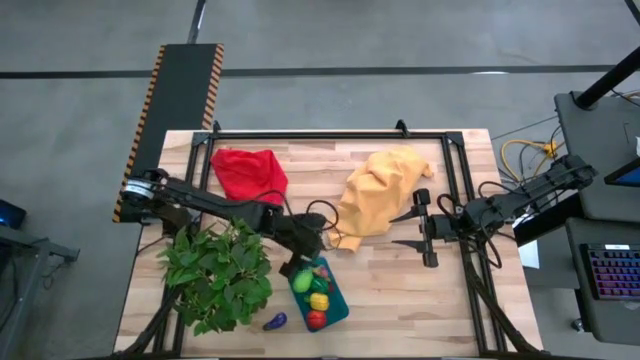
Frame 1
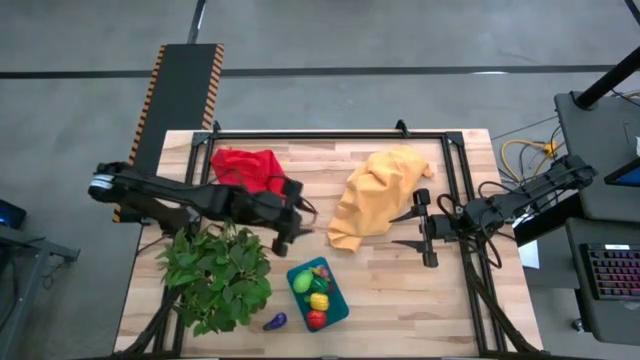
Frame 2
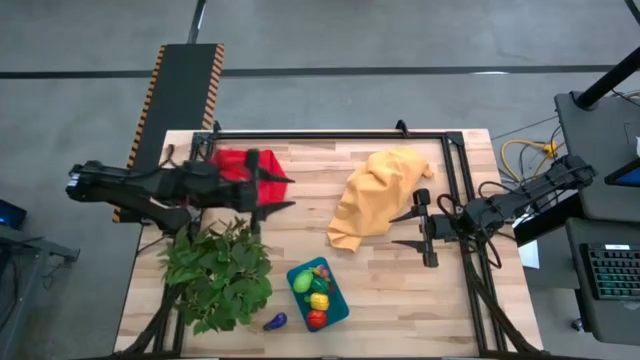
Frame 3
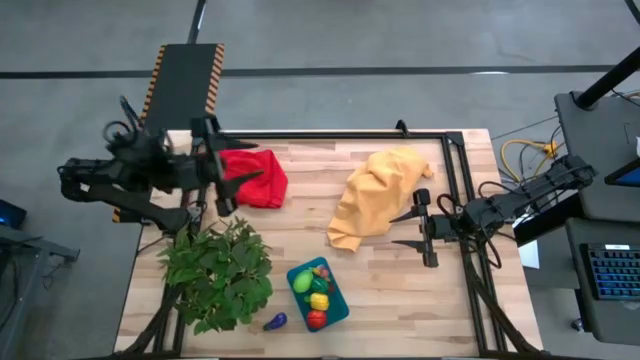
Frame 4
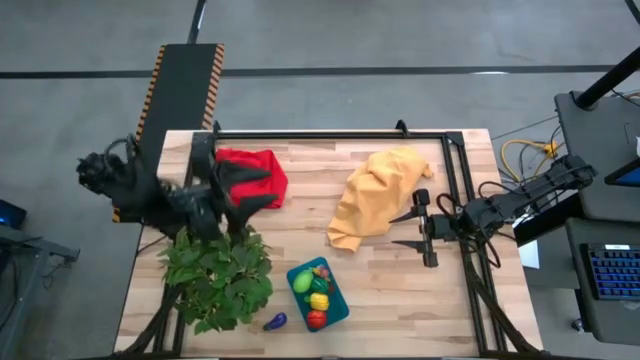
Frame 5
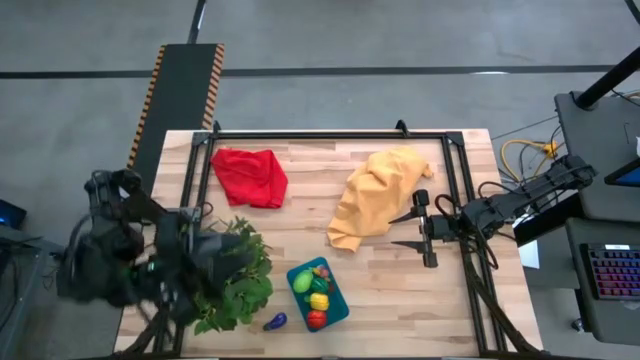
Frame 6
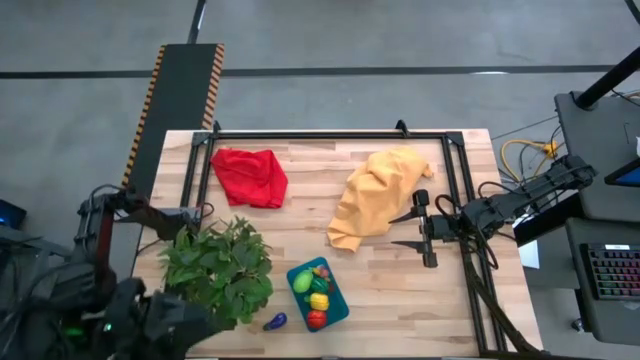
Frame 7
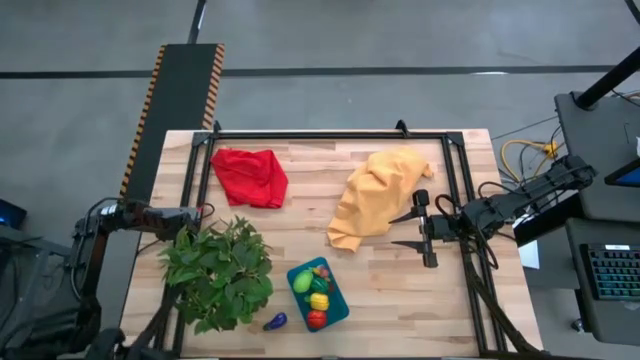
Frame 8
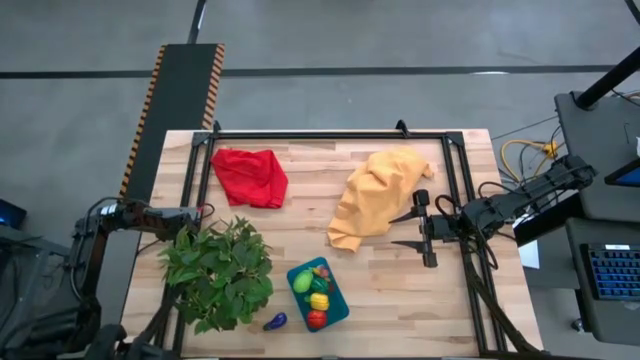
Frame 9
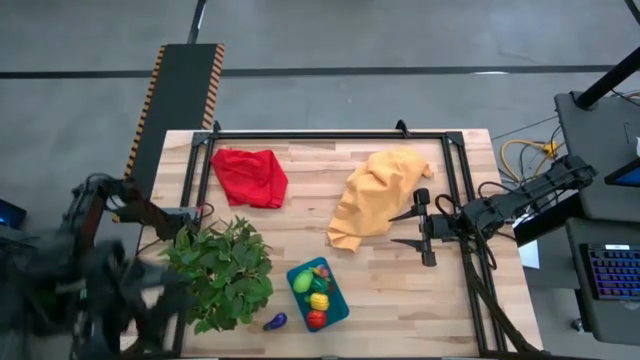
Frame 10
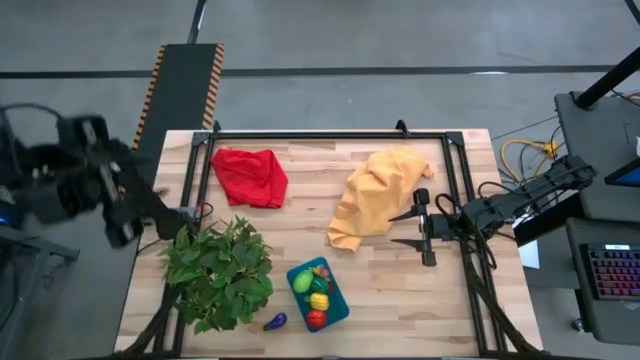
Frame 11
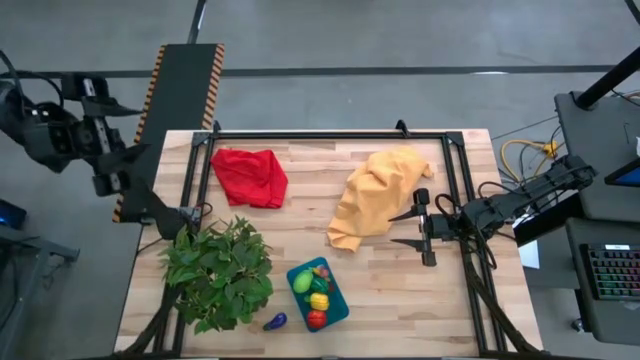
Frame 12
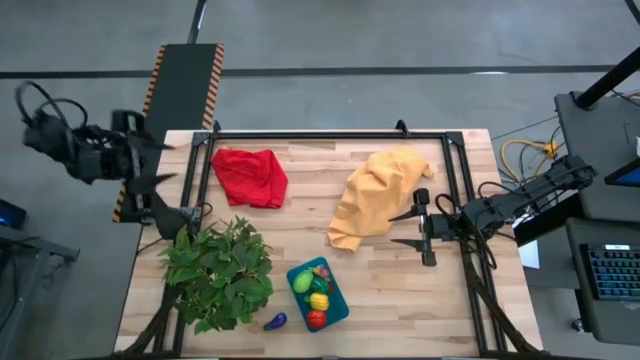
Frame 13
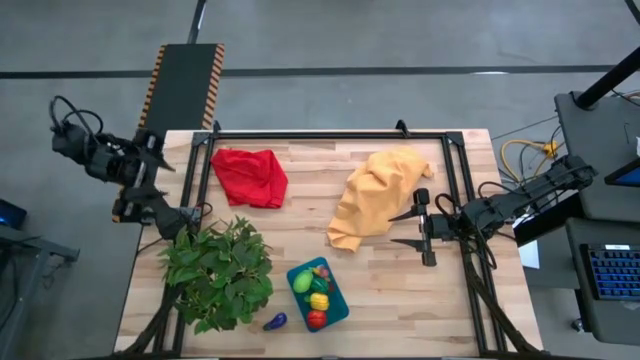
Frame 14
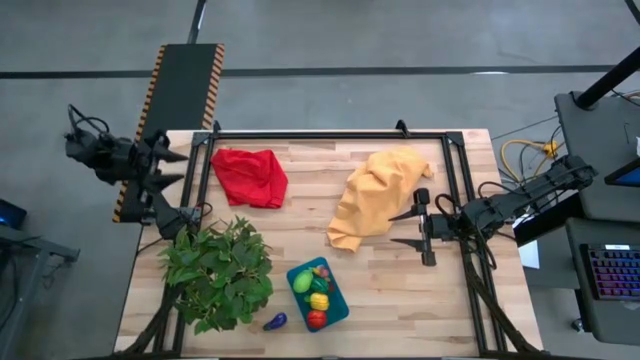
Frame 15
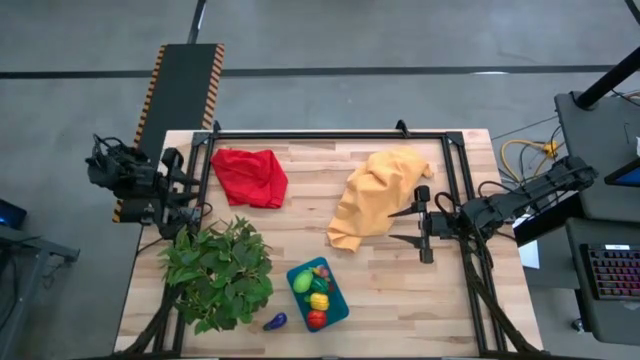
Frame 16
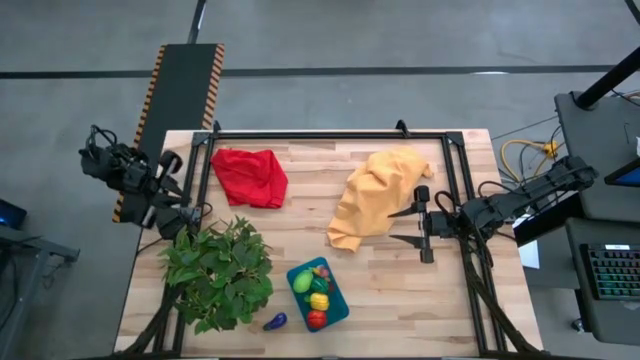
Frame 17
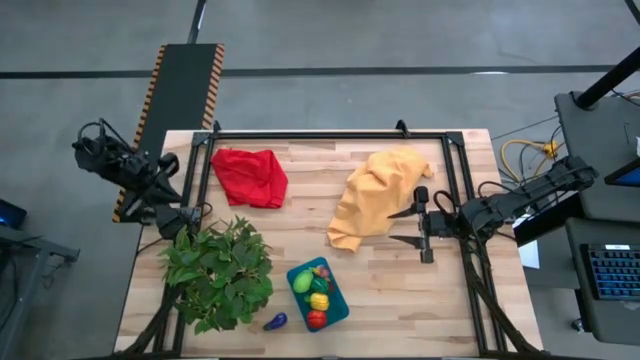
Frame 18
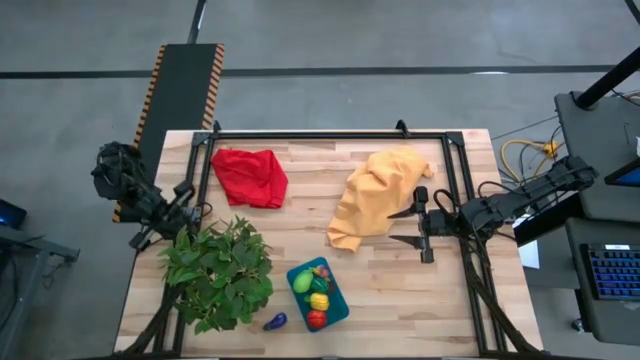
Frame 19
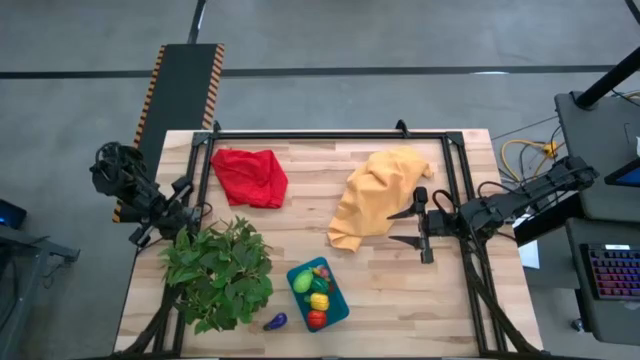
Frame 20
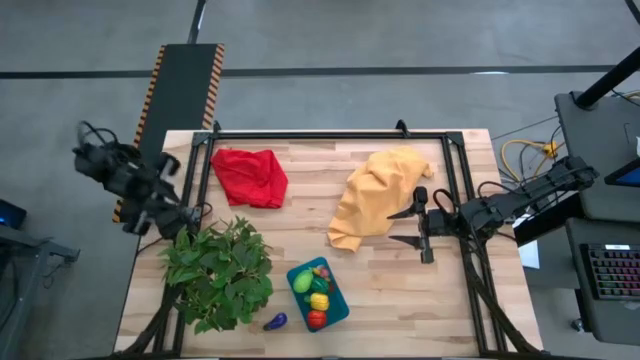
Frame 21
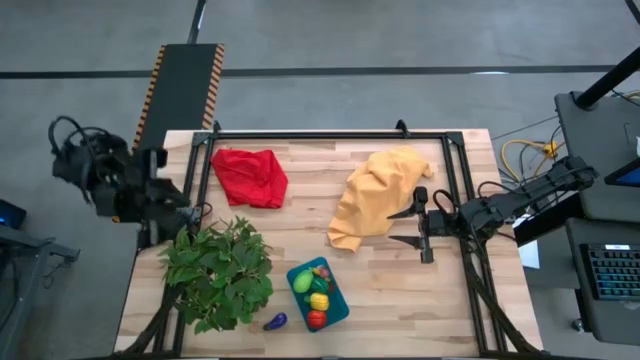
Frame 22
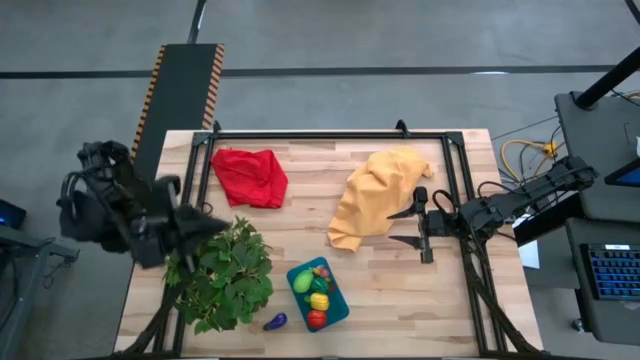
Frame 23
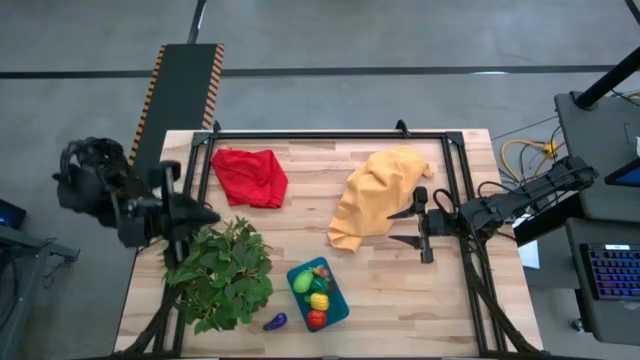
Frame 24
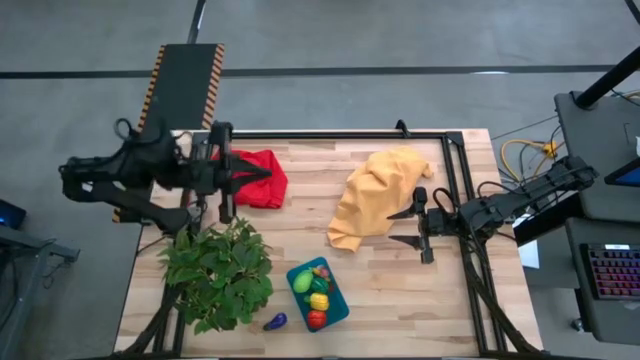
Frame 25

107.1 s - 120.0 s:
Task: Pick and placing Produce into tupperware
Put the eggplant into the bin

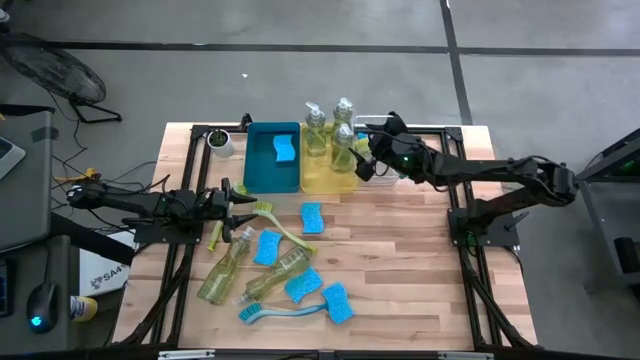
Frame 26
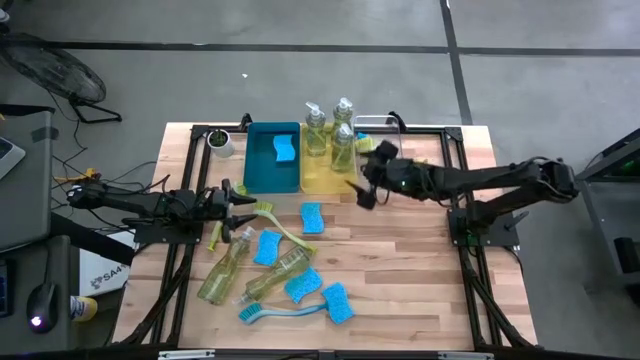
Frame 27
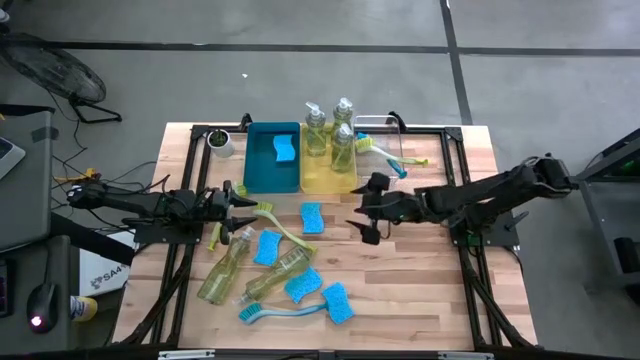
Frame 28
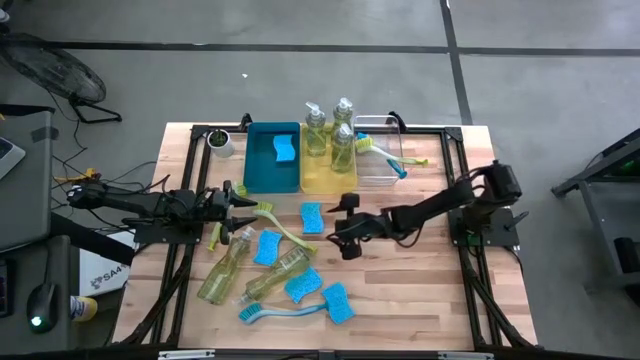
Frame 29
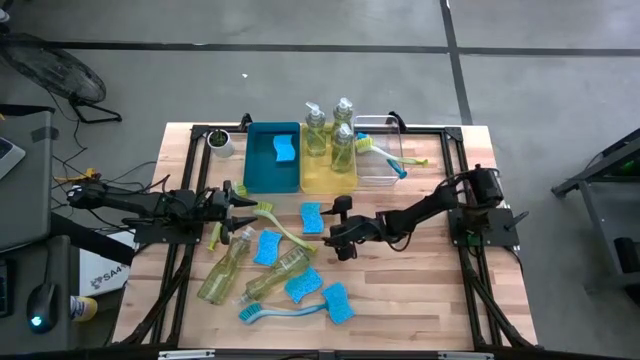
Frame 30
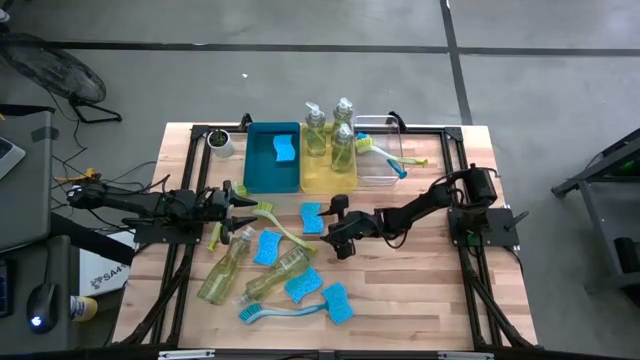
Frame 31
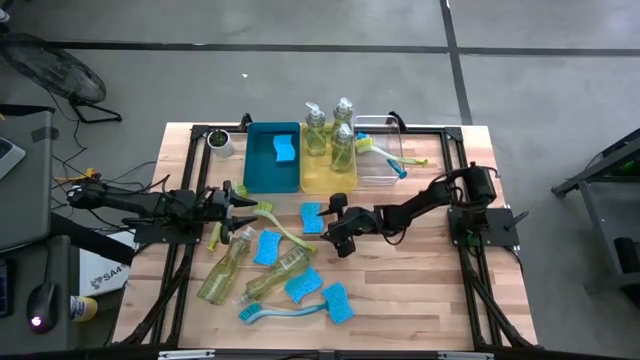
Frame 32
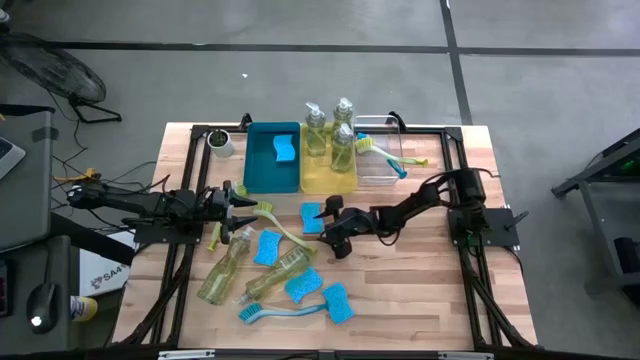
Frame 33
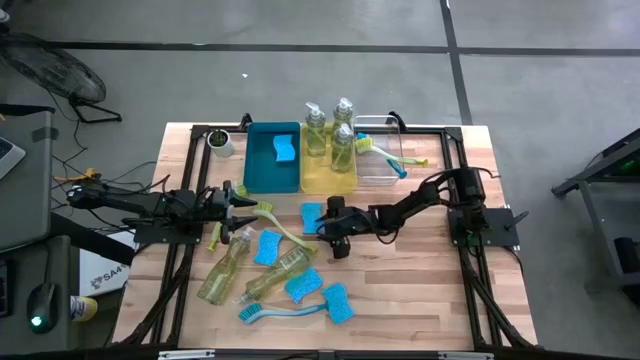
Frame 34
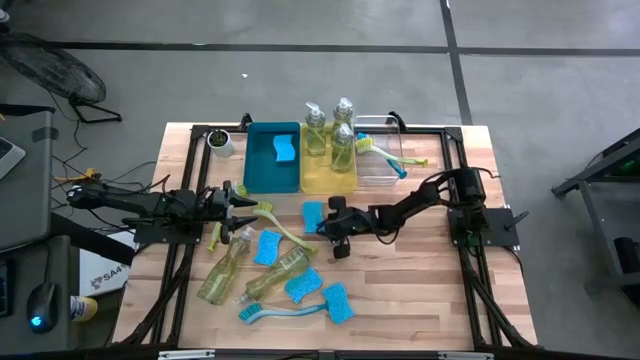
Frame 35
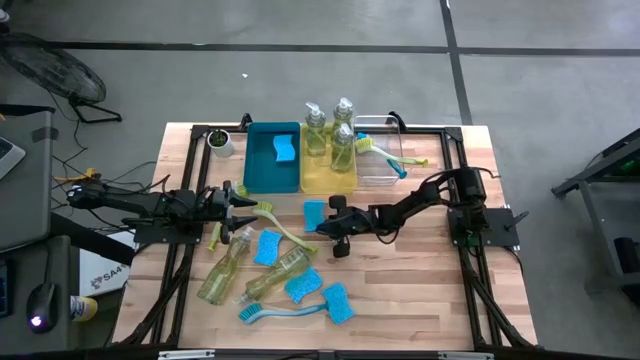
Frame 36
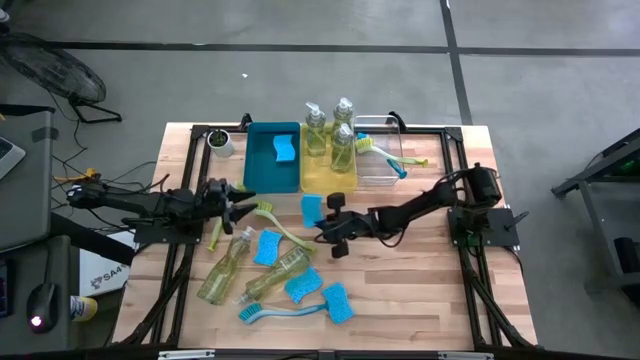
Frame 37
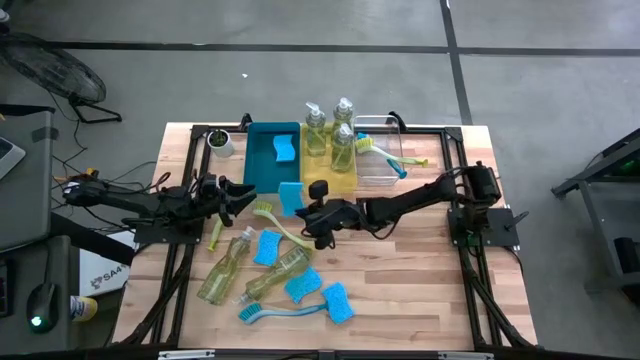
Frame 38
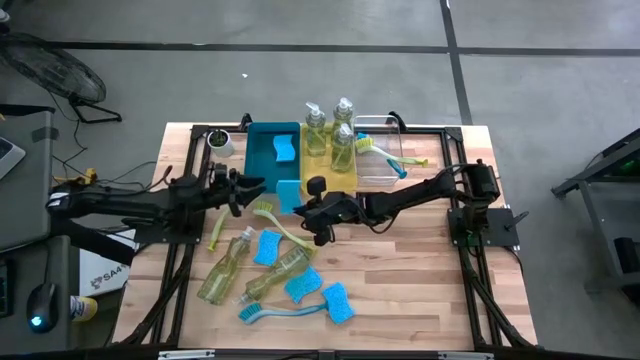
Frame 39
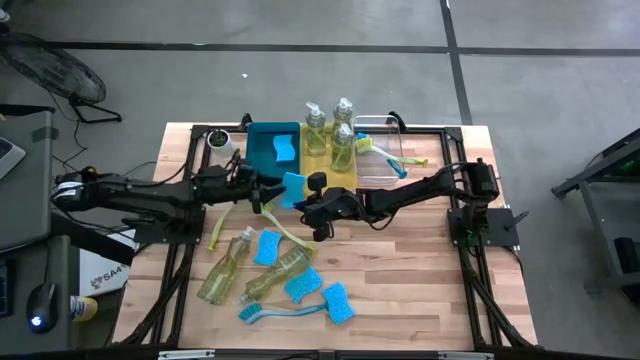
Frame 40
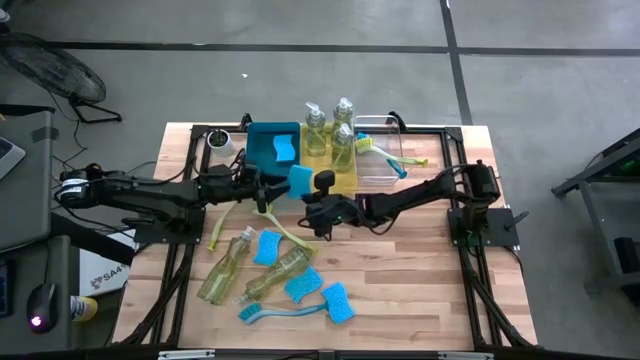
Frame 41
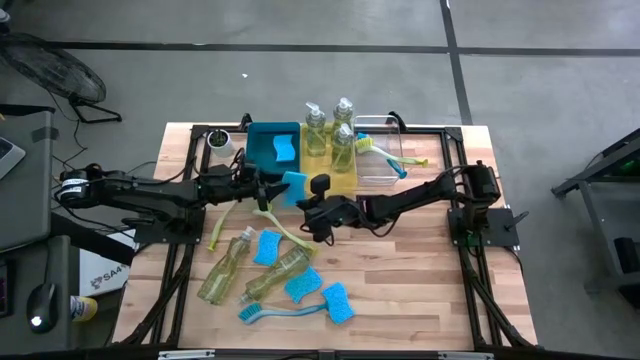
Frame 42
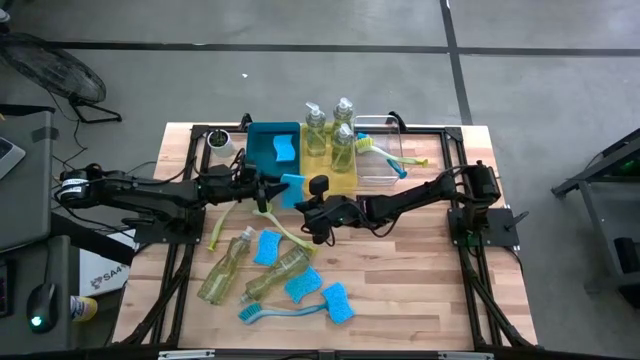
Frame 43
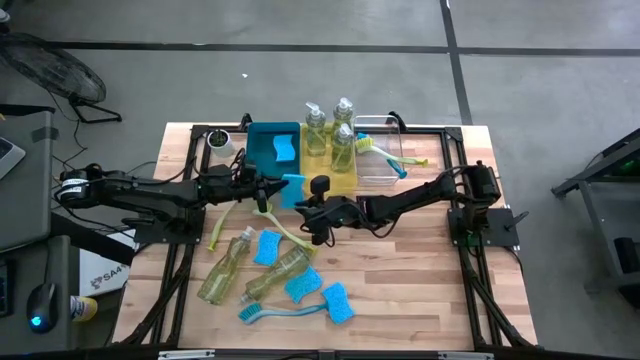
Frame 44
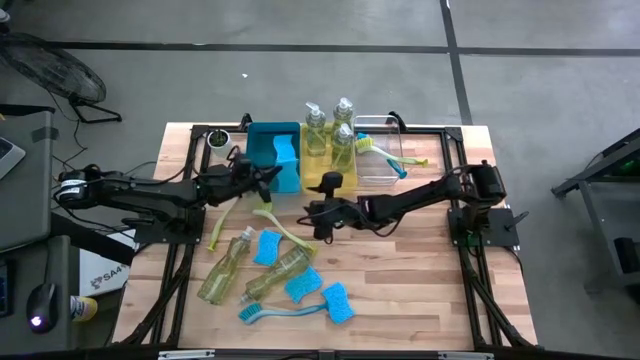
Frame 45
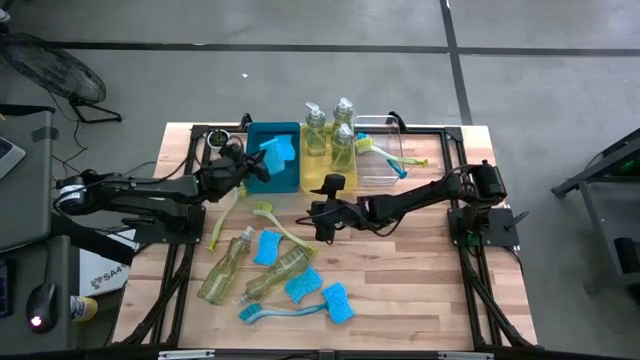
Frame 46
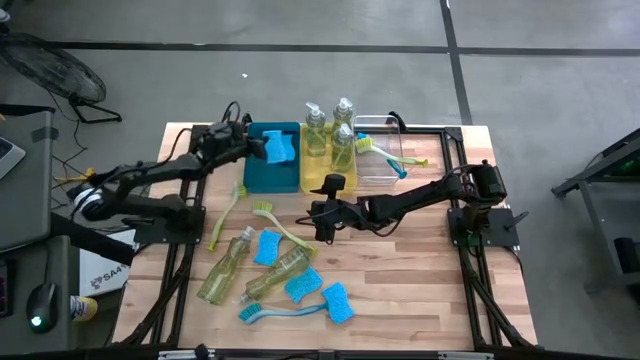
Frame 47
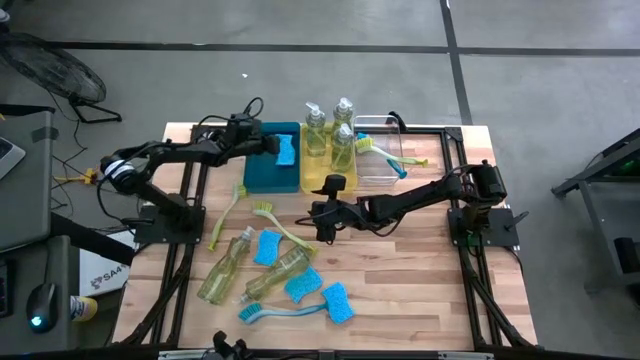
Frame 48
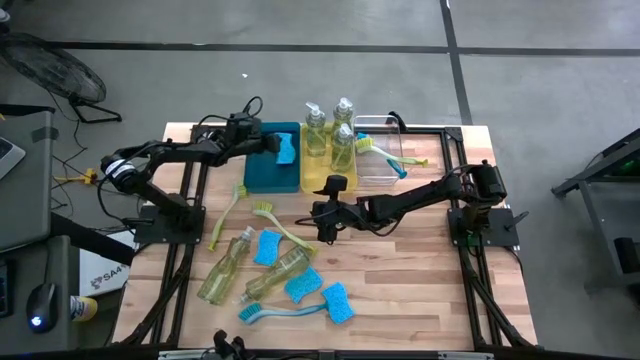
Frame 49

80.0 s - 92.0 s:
Task: Pick & Place Kitchen Sink Supplies
Put the blue sponge into the blue bin
